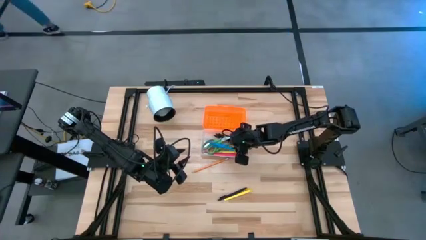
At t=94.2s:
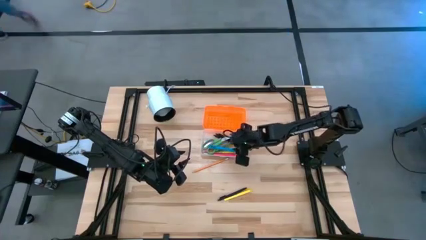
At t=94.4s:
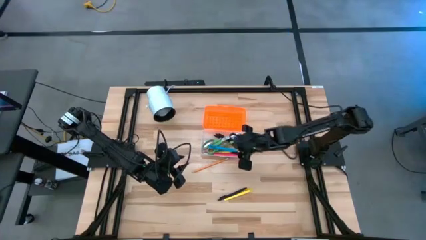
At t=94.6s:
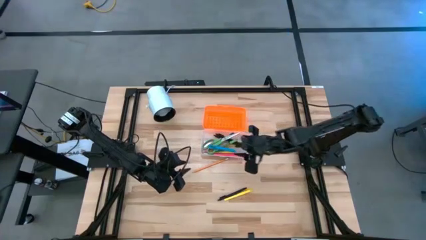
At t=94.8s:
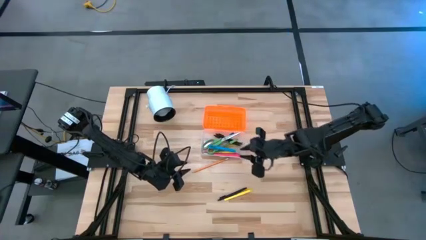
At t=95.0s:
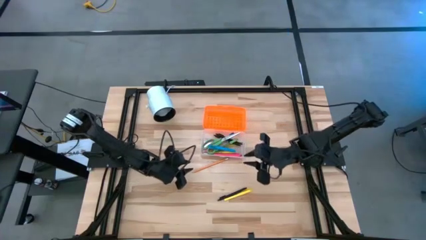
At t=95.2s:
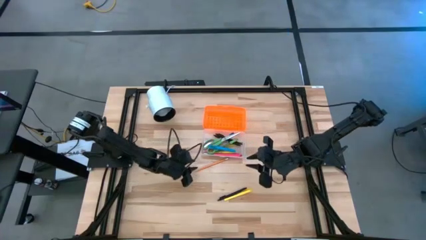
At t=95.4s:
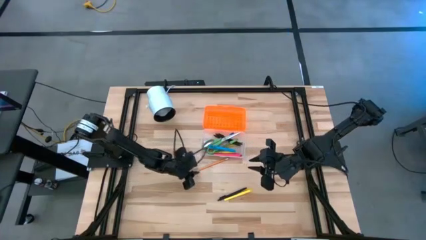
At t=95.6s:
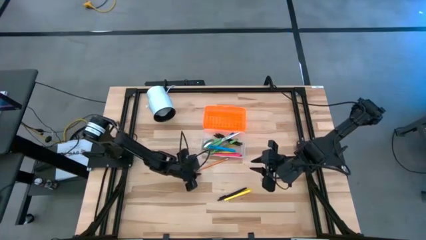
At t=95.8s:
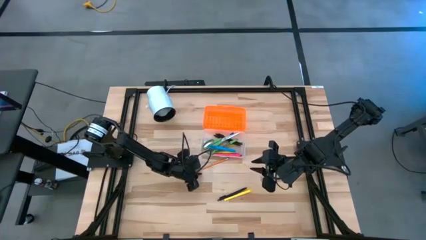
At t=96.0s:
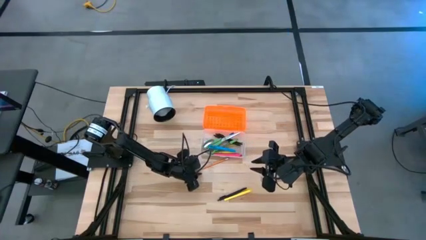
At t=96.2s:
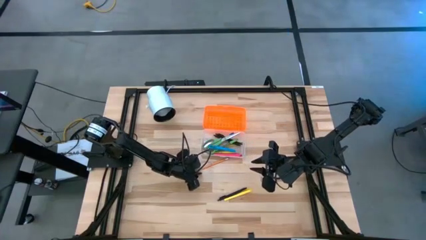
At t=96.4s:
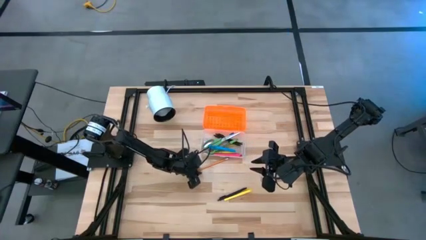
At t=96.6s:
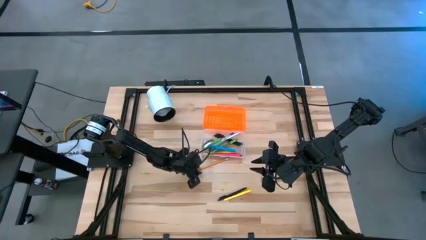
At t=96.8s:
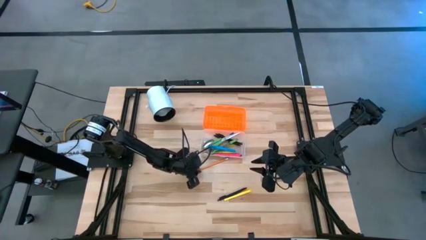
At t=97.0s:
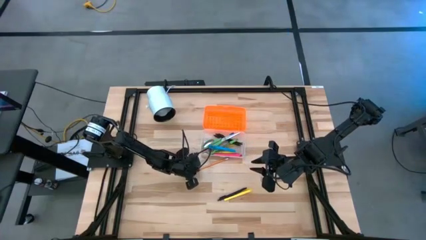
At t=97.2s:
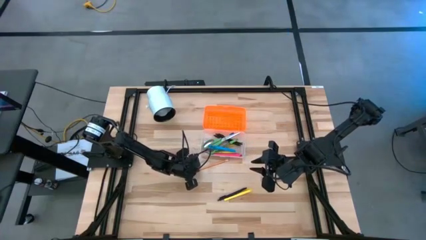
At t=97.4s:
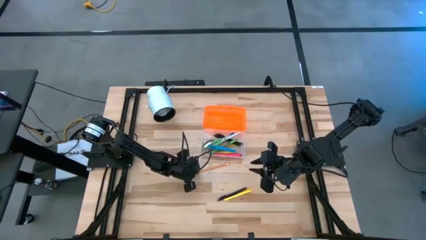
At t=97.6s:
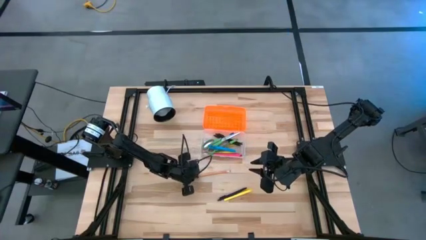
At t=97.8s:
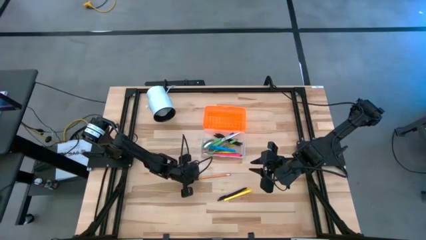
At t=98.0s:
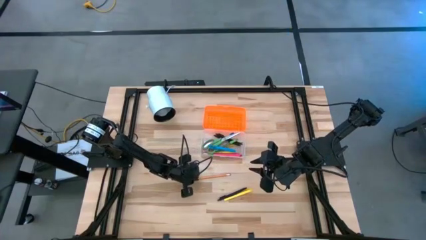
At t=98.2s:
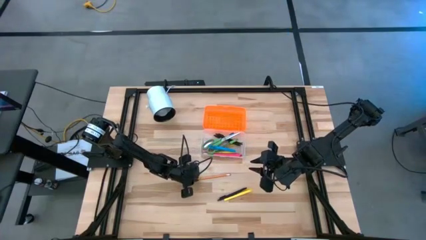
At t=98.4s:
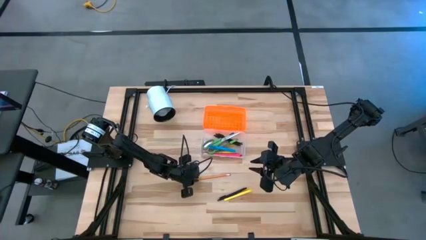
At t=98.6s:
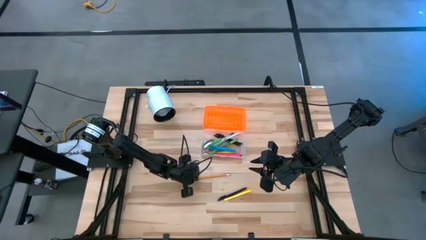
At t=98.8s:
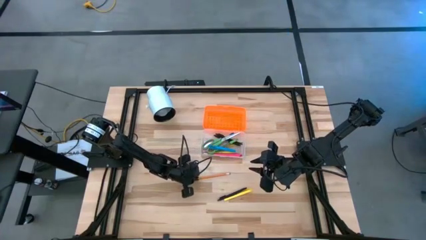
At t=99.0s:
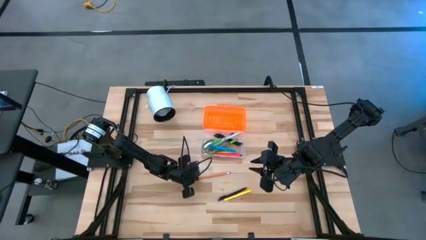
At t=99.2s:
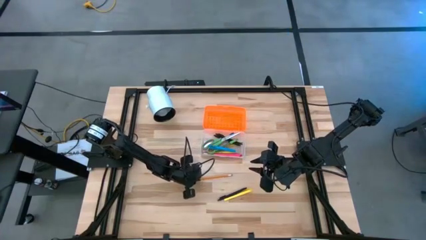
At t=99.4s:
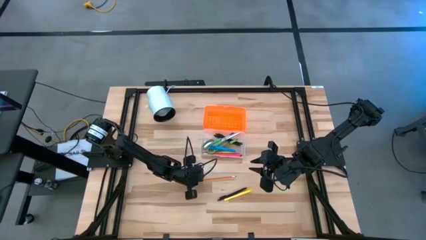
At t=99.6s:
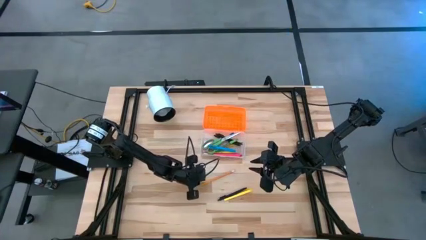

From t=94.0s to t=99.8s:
Task: Pick & place school supplies into a supply box
Put the orange pencil into the orange supply box

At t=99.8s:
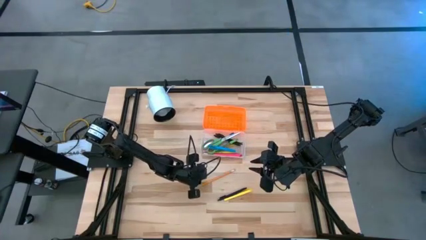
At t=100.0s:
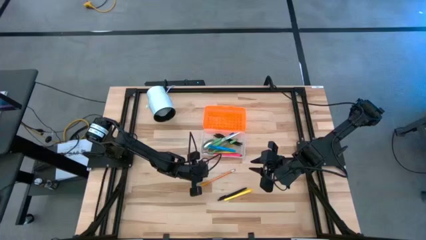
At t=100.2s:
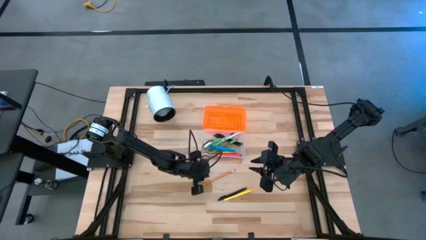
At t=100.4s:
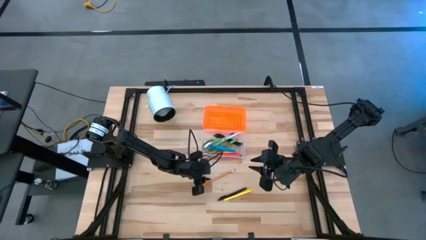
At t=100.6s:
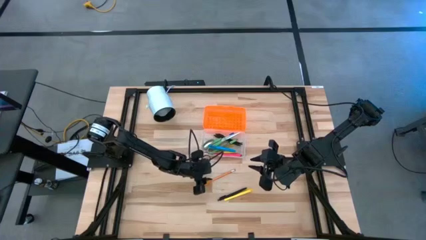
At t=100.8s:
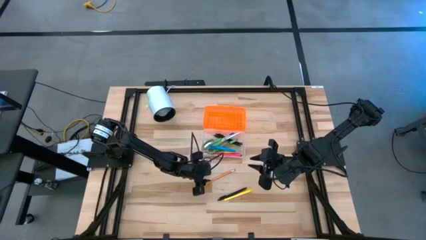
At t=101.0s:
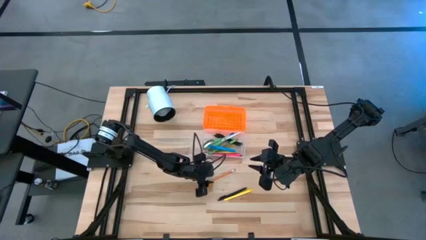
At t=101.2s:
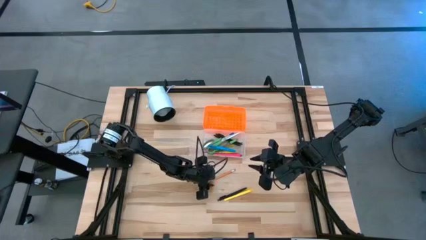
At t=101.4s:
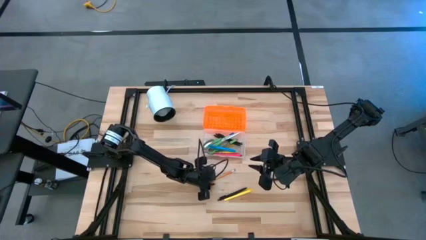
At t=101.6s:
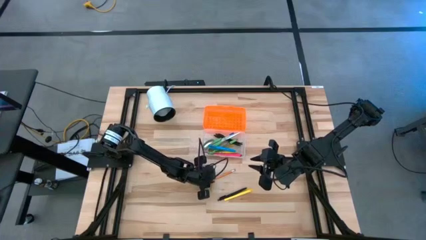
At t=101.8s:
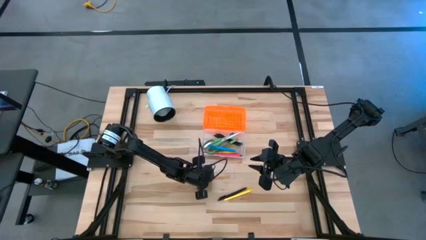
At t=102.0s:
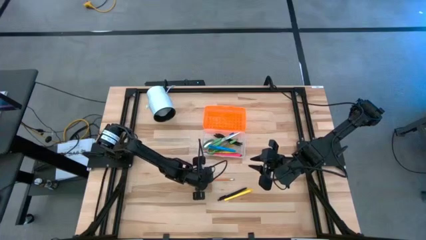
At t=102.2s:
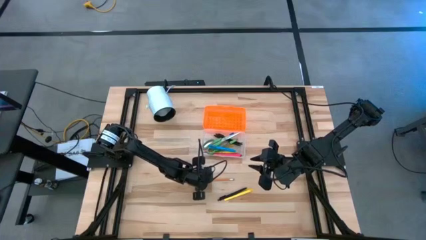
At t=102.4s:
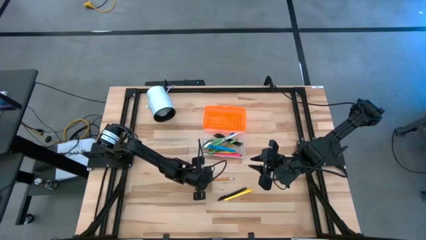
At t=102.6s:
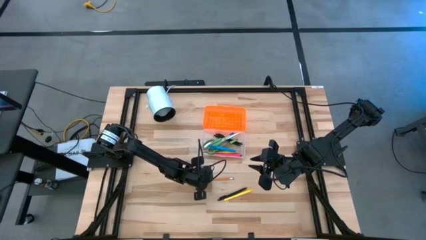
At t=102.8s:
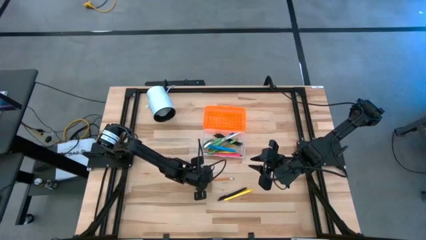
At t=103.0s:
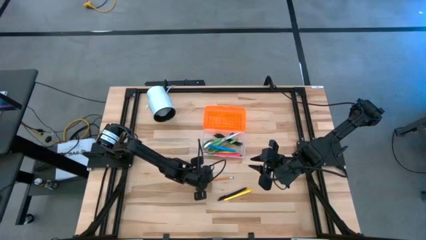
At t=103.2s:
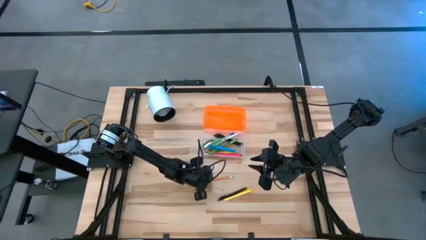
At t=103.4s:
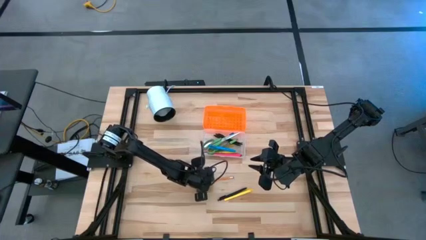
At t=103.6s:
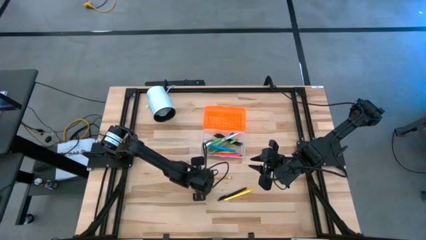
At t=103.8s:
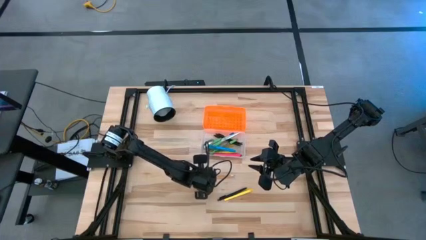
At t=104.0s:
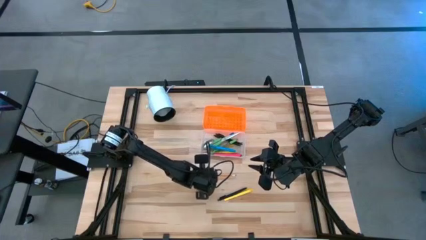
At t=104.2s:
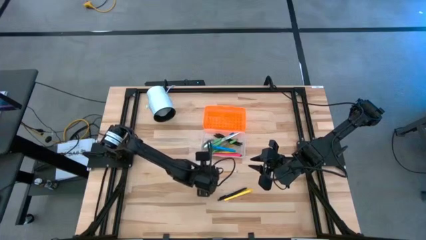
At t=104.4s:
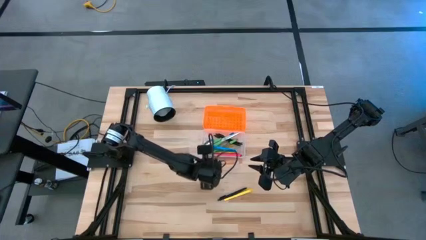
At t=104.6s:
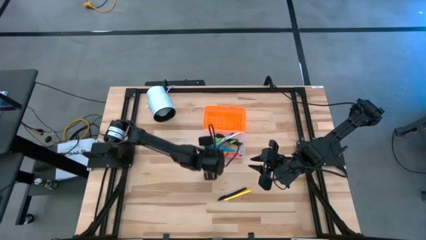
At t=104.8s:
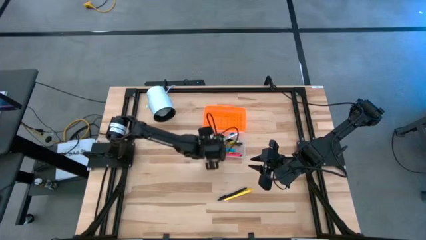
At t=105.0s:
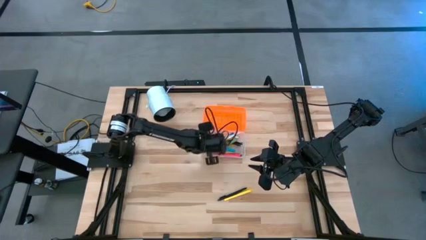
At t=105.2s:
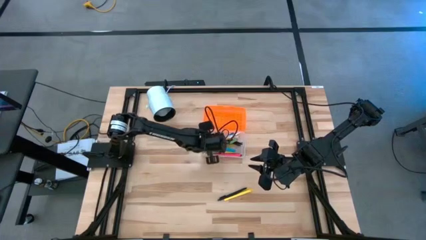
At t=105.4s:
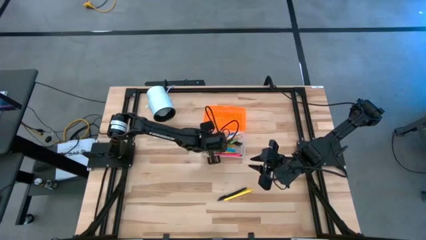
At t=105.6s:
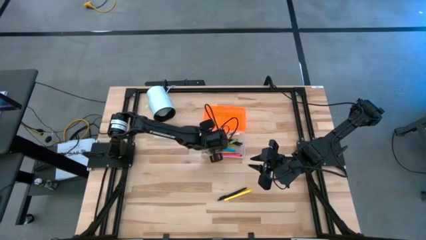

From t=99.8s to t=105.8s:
Put the orange pencil into the orange supply box

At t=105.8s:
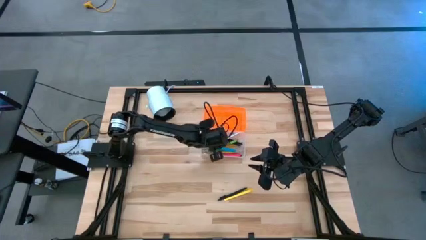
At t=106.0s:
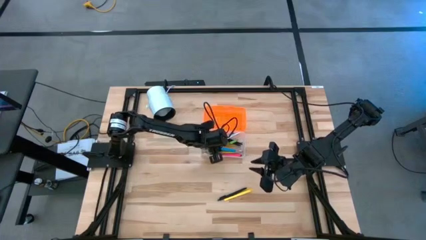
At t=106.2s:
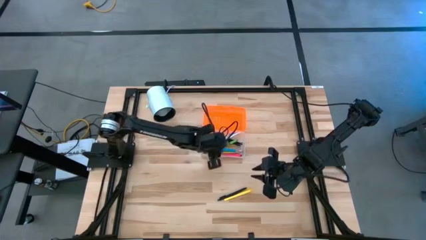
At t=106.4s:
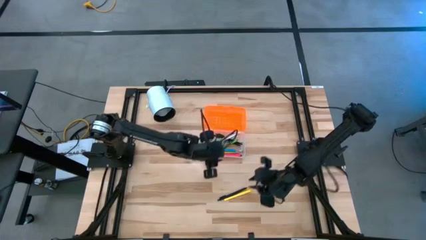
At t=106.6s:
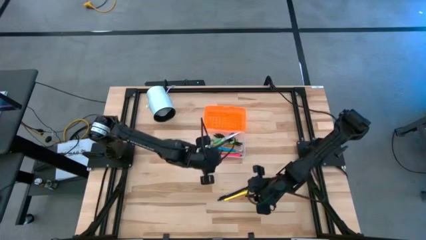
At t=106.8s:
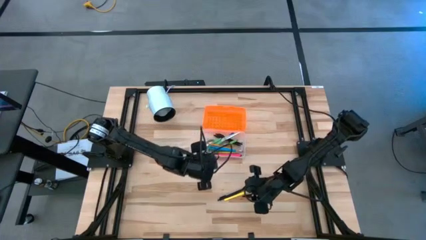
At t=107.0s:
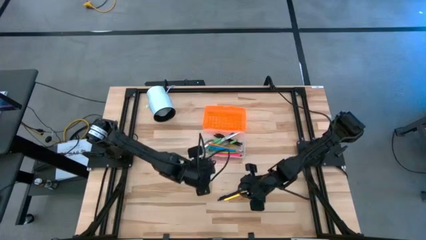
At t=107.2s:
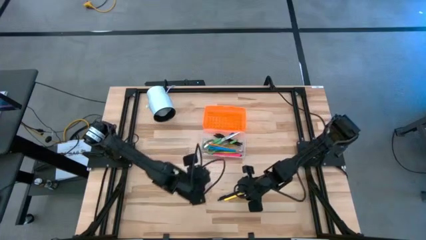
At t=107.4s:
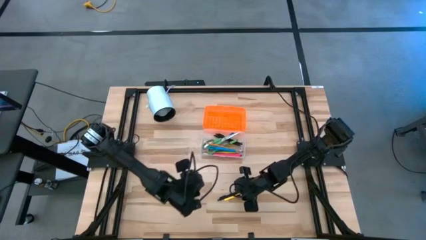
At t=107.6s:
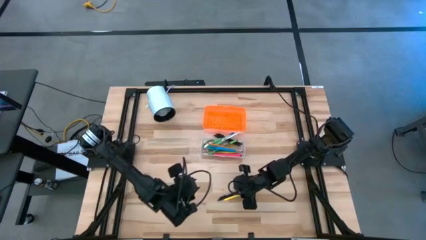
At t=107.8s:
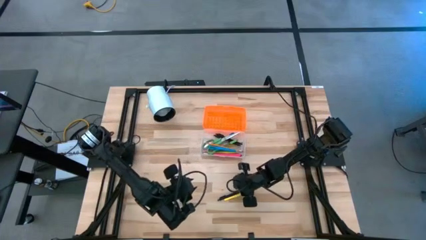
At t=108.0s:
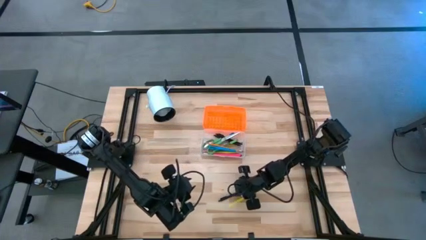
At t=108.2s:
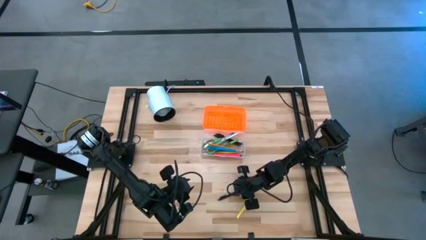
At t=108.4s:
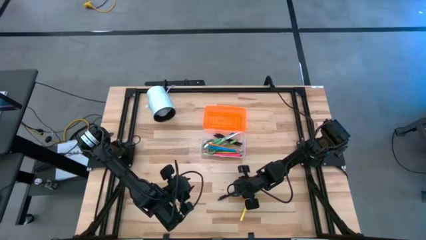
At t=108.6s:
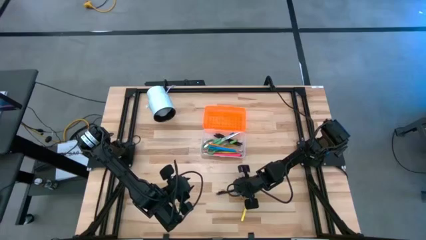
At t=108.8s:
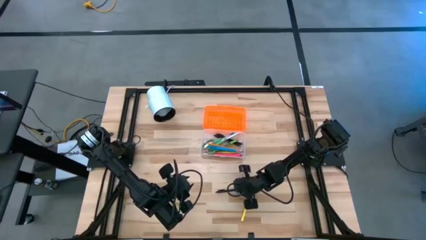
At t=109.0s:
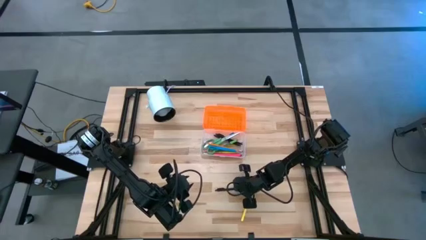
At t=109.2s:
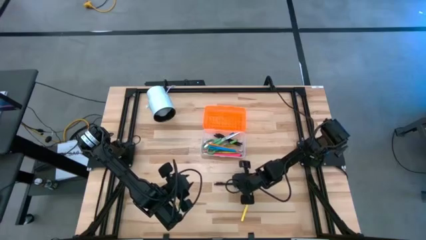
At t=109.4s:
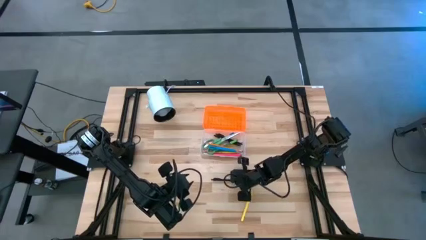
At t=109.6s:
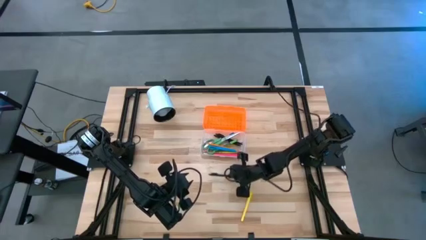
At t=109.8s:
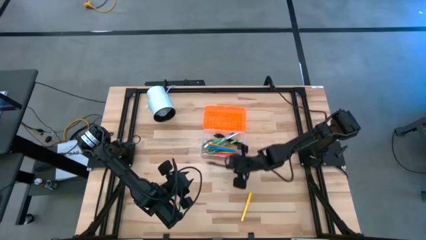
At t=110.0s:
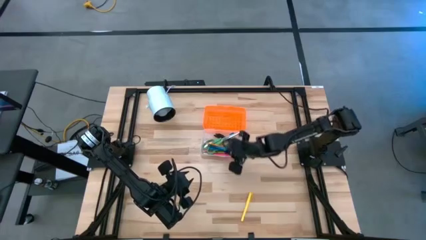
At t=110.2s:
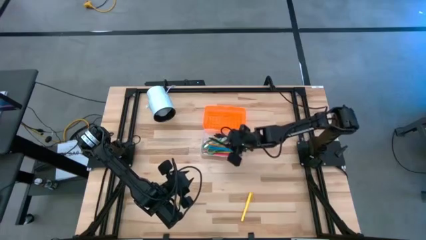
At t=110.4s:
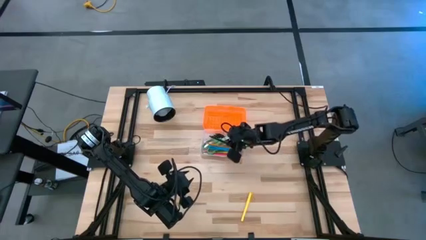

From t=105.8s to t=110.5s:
Put the black pen into the orange supply box
